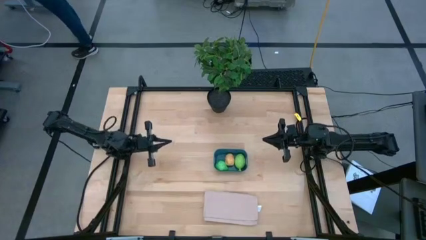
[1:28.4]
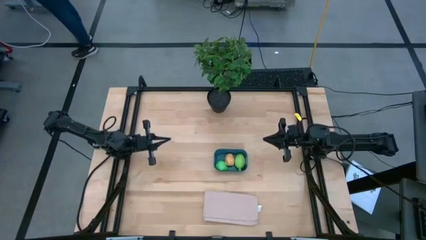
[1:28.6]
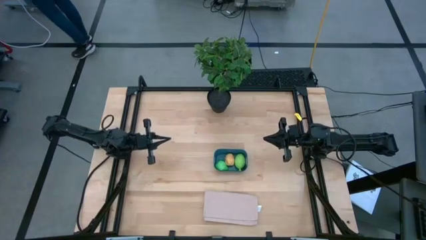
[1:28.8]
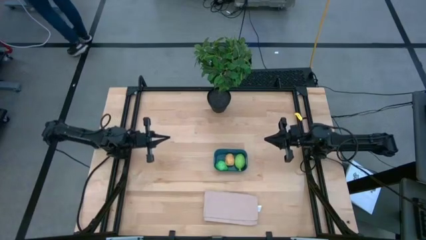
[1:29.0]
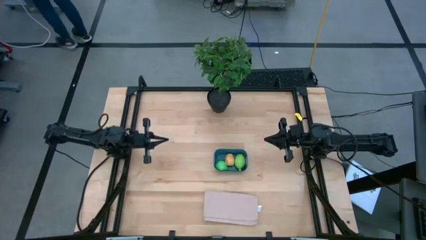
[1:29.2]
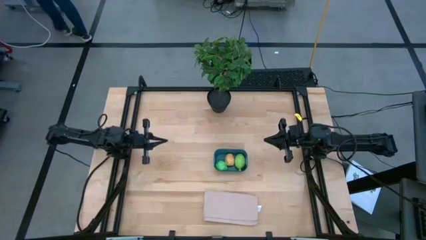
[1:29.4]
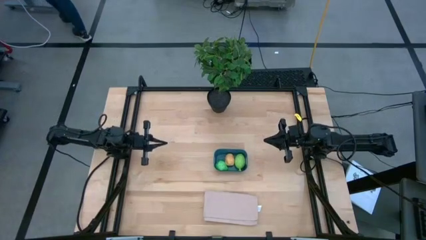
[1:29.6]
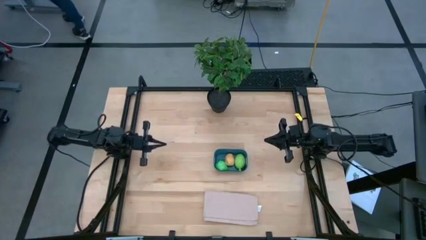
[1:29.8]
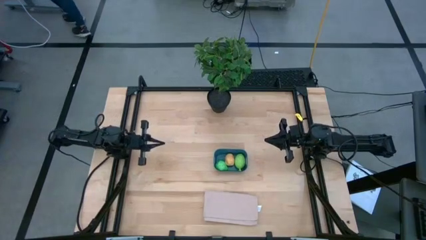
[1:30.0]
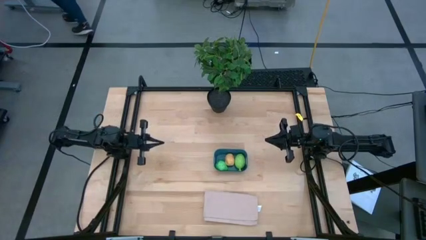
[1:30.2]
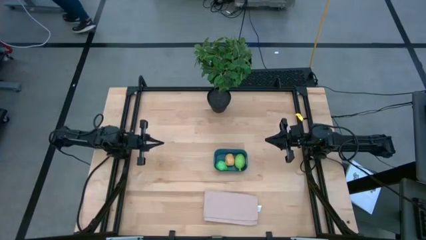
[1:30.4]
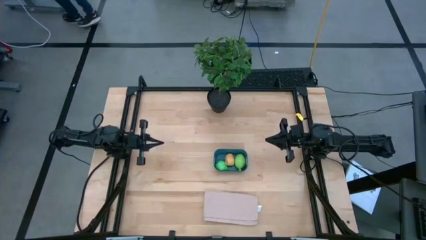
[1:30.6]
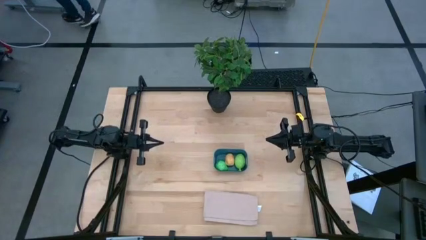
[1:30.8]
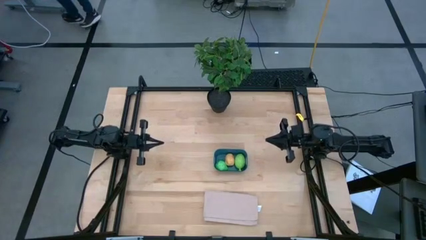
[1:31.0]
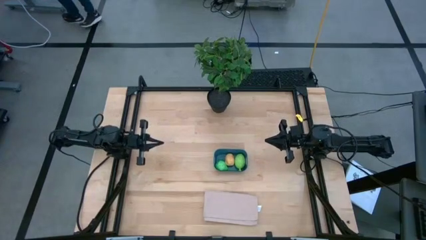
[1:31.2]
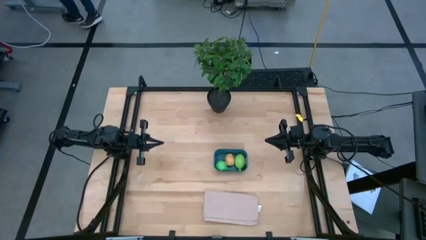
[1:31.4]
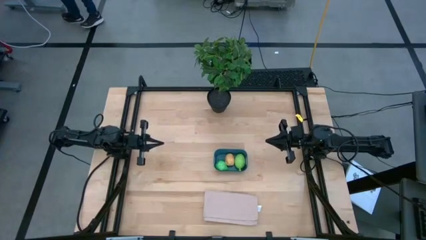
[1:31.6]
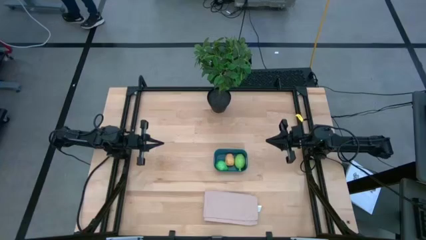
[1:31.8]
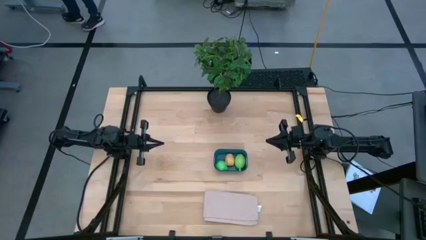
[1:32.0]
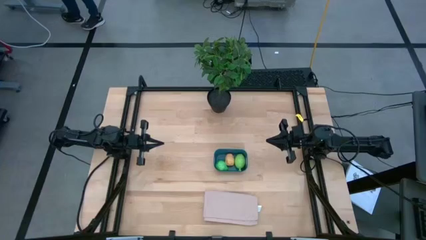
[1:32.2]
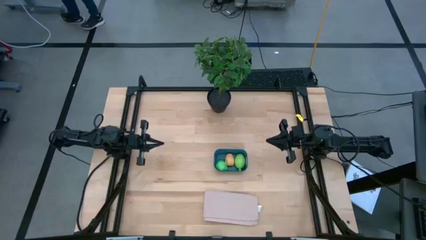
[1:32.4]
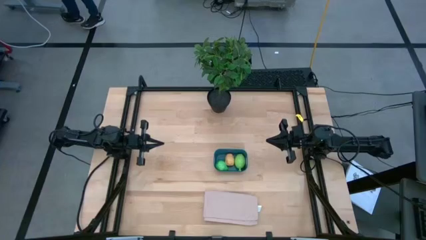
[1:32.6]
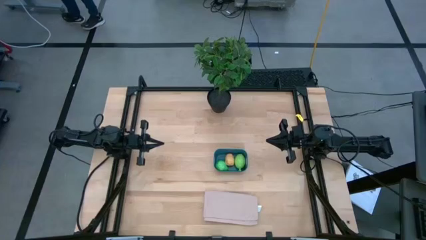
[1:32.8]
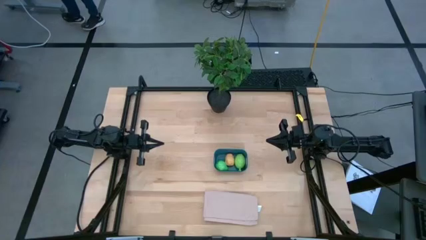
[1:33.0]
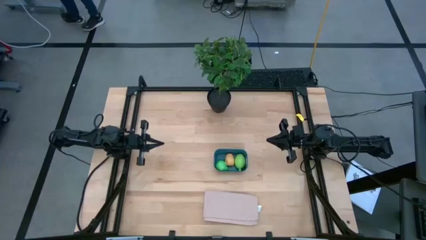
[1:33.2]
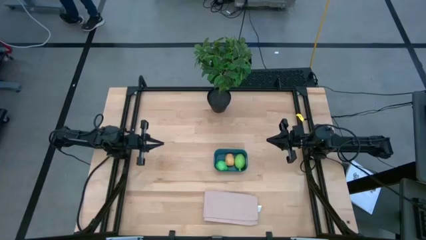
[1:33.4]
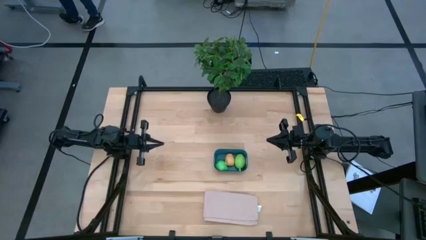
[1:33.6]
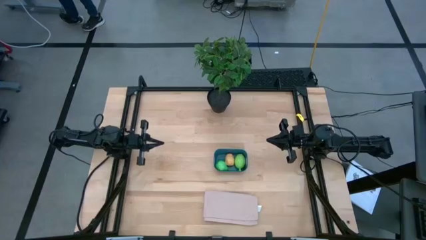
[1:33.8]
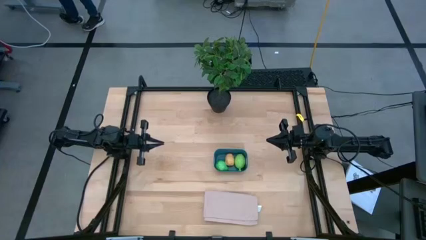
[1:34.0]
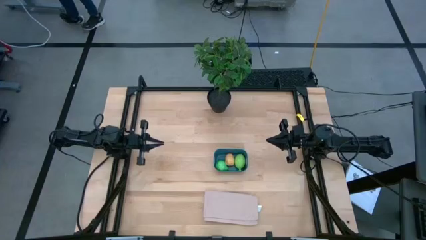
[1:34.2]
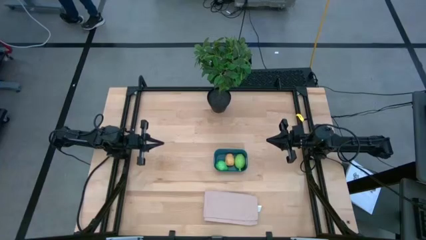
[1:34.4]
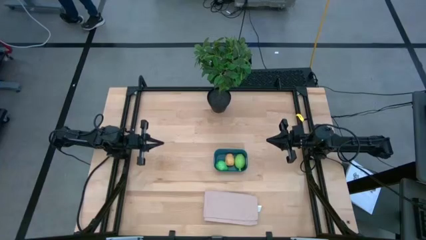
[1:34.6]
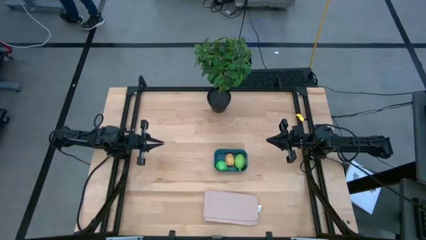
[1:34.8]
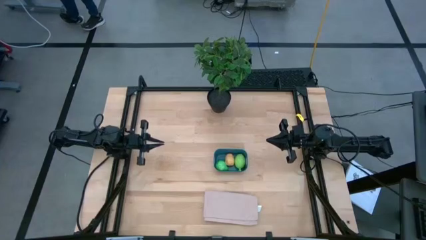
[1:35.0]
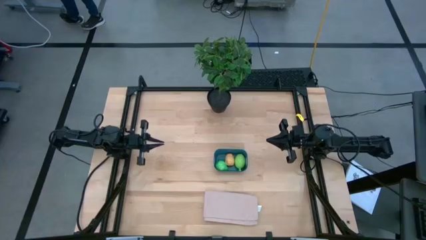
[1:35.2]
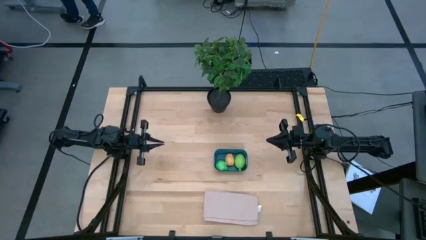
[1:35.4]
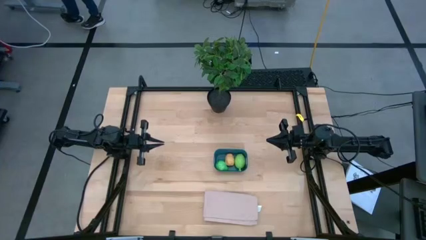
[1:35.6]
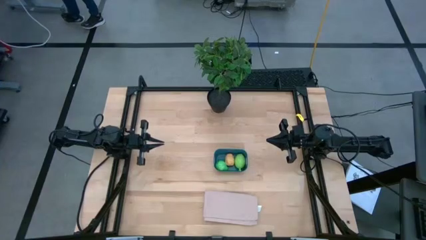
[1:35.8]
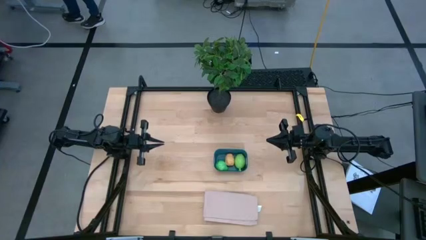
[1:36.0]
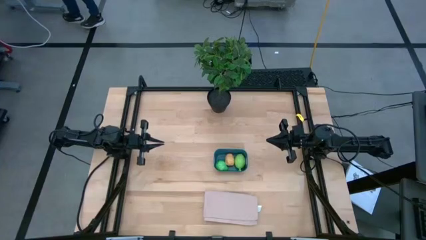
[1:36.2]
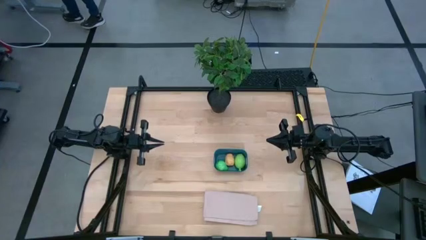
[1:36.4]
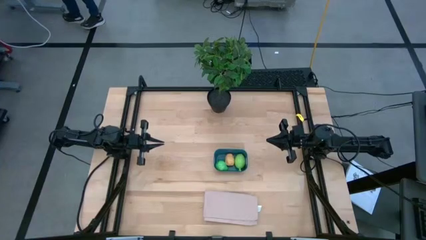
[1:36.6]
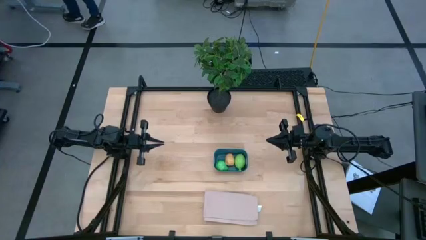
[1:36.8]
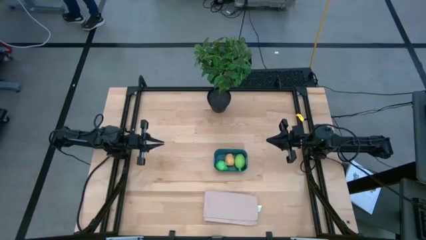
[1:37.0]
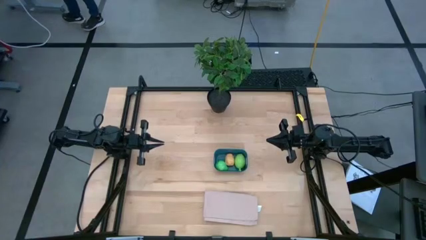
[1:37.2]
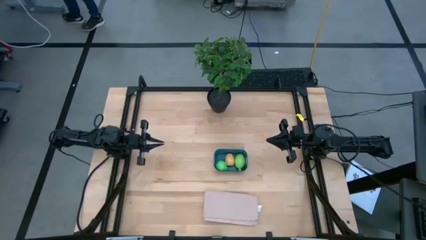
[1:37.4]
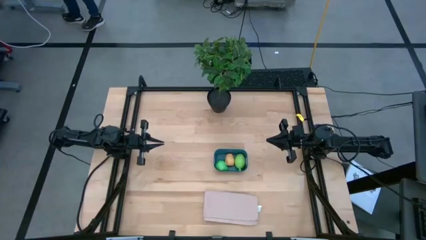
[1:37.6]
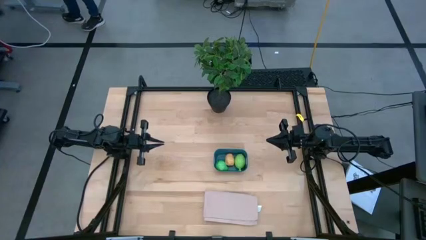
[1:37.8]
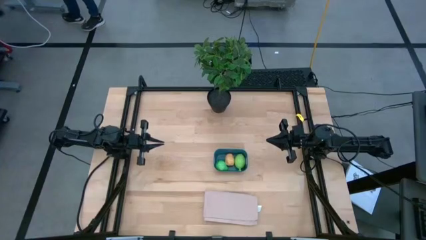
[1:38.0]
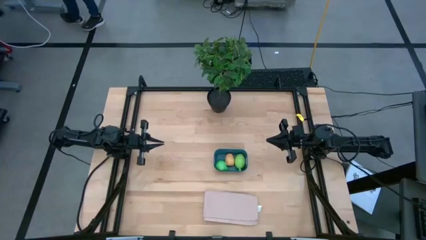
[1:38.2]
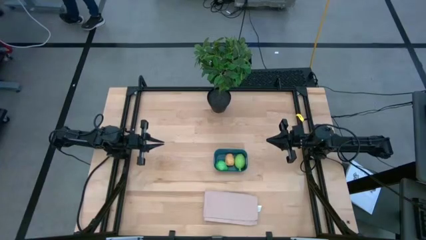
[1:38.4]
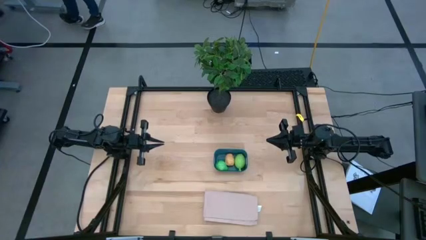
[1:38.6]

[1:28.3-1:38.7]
Task: Pick and placing Produce into tupperware
Return to Home Position
